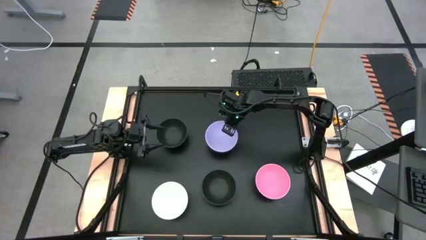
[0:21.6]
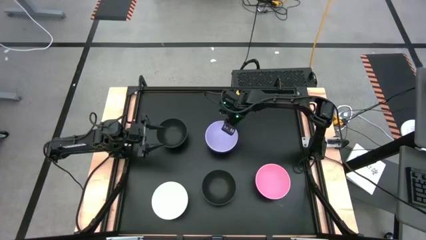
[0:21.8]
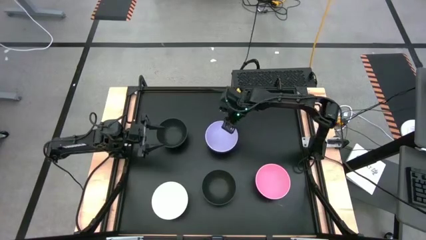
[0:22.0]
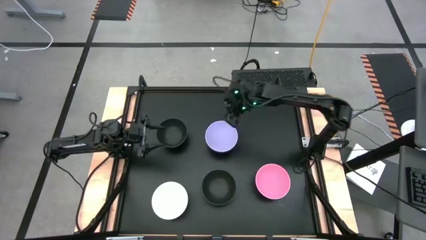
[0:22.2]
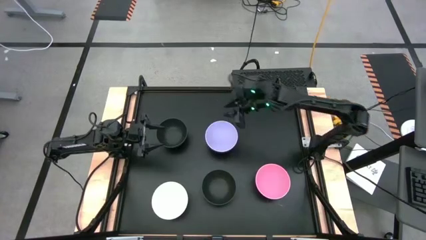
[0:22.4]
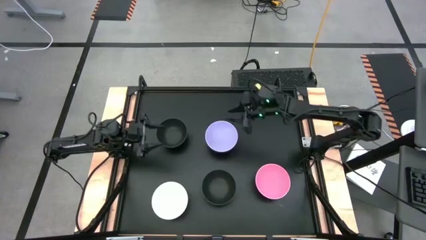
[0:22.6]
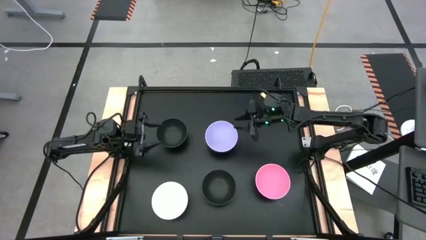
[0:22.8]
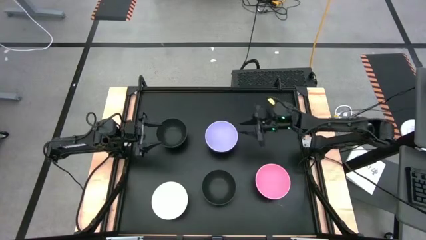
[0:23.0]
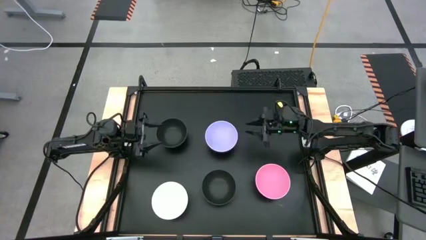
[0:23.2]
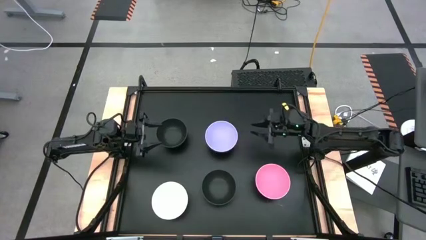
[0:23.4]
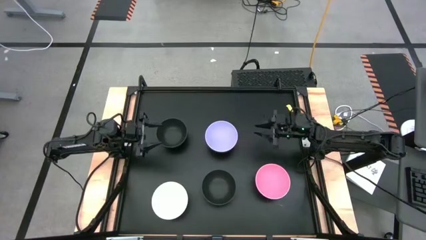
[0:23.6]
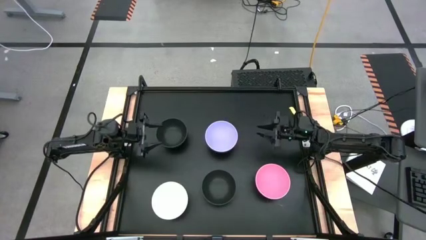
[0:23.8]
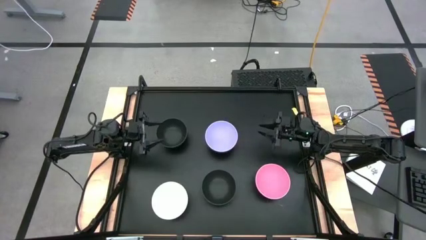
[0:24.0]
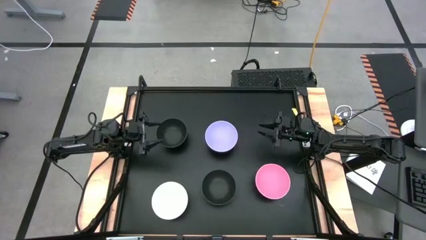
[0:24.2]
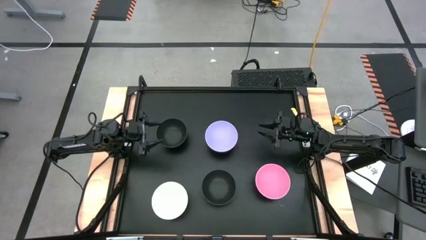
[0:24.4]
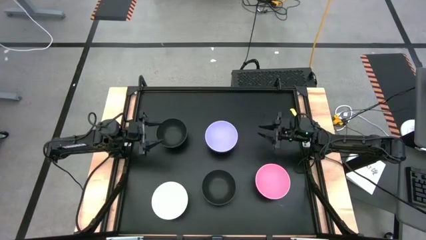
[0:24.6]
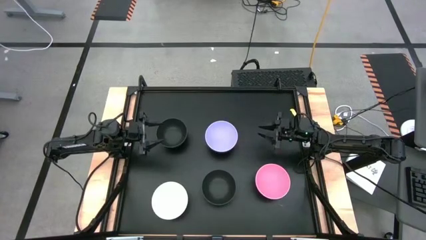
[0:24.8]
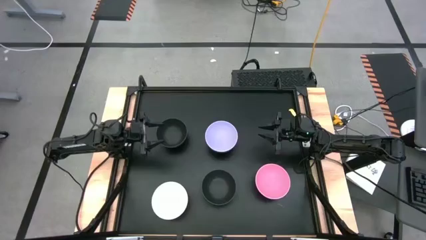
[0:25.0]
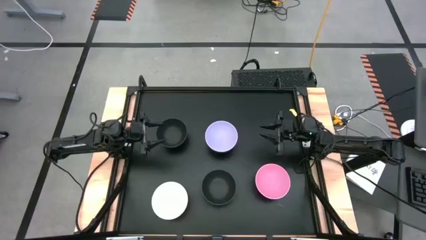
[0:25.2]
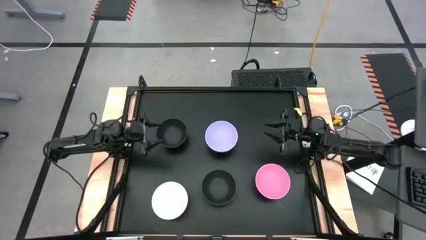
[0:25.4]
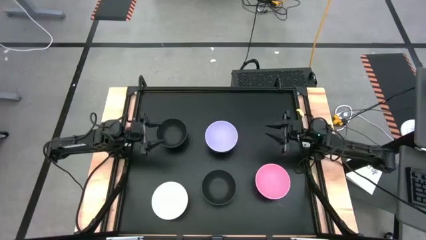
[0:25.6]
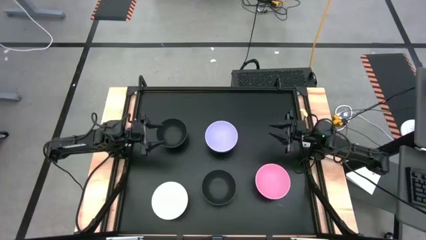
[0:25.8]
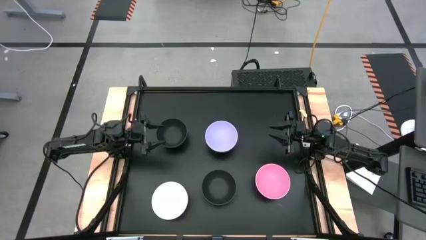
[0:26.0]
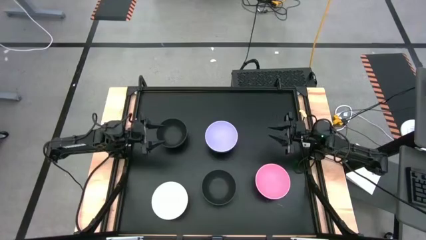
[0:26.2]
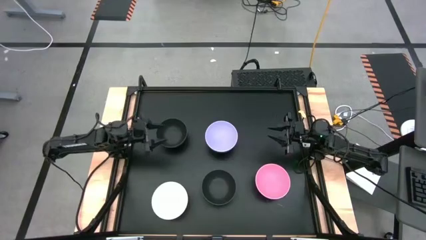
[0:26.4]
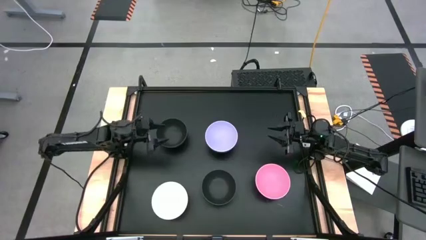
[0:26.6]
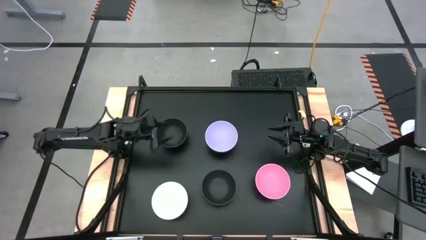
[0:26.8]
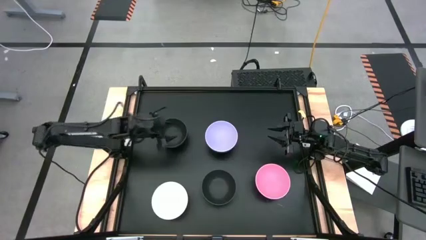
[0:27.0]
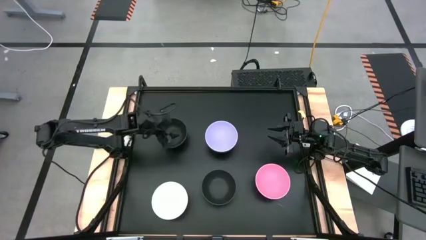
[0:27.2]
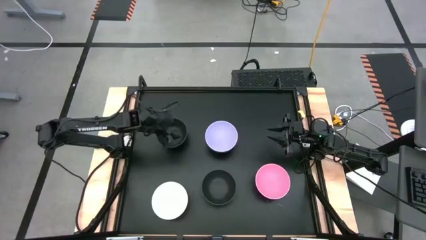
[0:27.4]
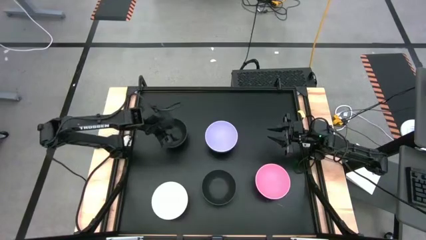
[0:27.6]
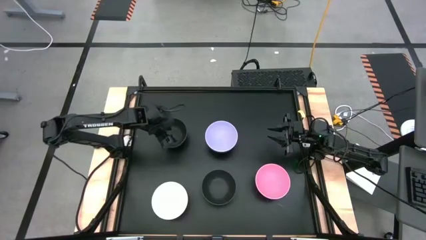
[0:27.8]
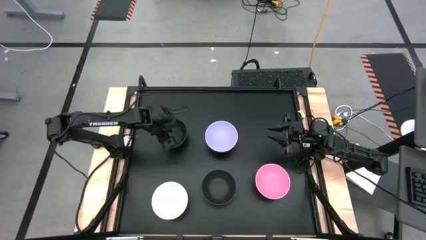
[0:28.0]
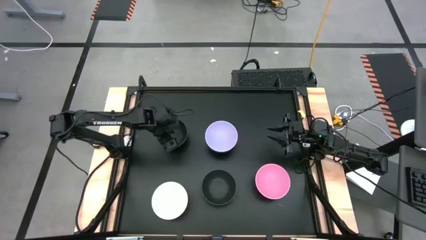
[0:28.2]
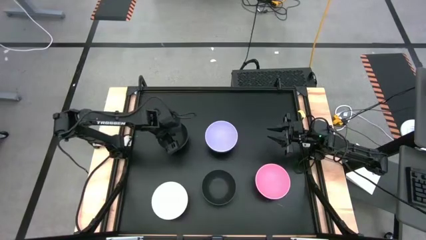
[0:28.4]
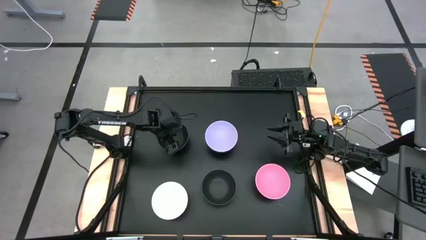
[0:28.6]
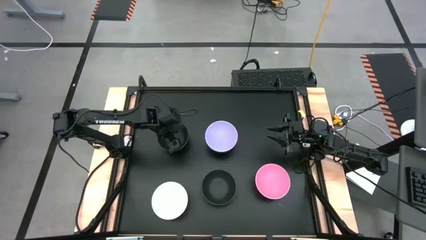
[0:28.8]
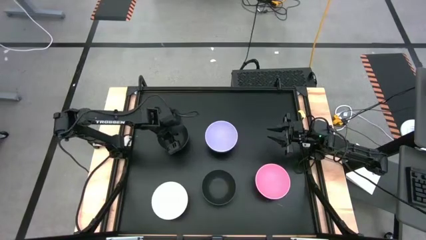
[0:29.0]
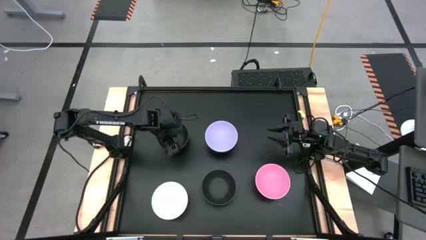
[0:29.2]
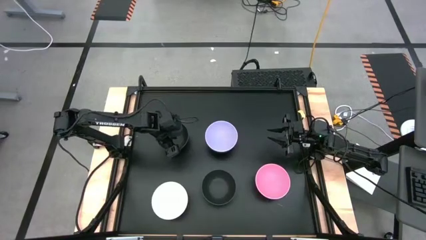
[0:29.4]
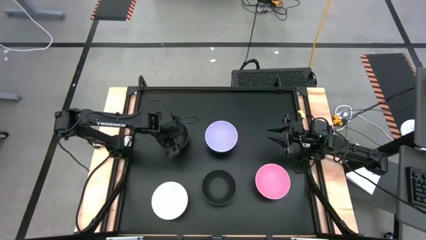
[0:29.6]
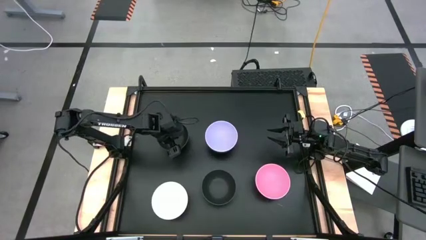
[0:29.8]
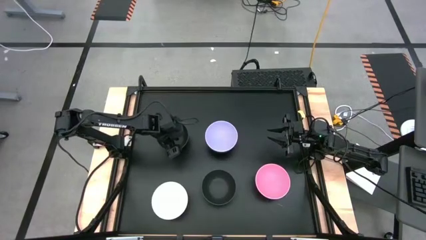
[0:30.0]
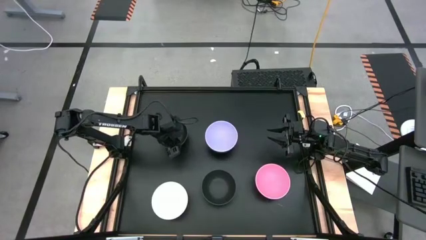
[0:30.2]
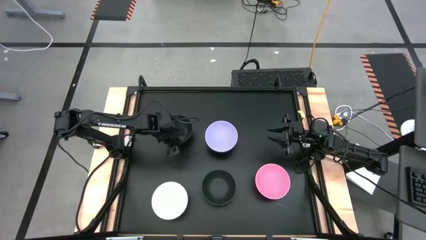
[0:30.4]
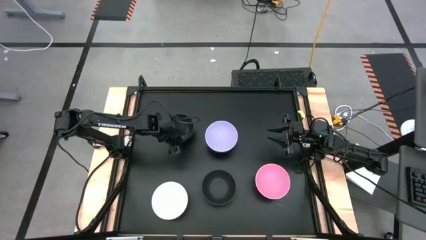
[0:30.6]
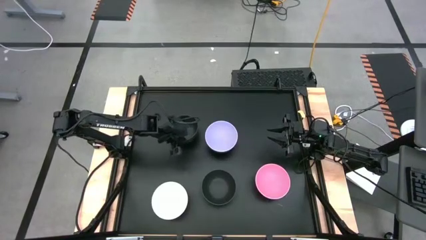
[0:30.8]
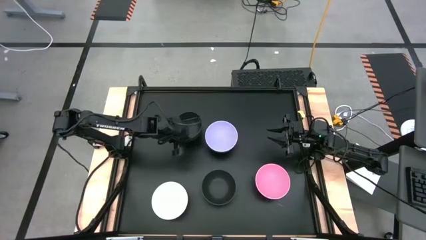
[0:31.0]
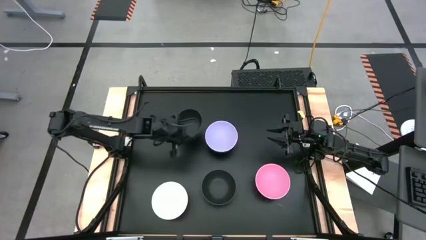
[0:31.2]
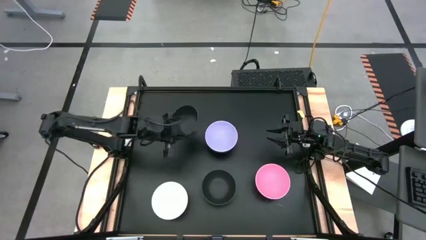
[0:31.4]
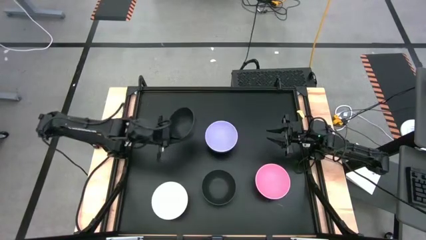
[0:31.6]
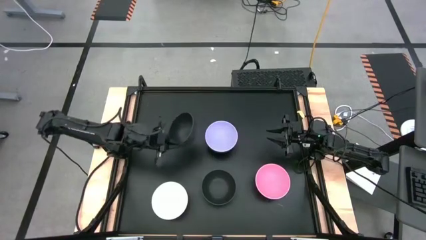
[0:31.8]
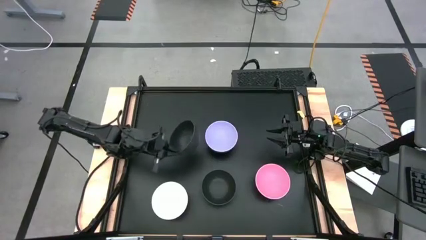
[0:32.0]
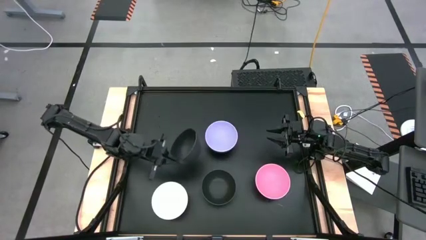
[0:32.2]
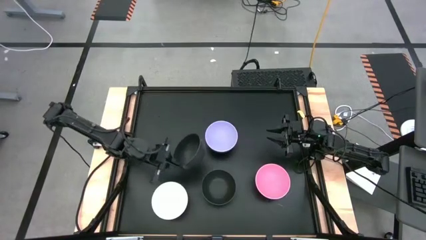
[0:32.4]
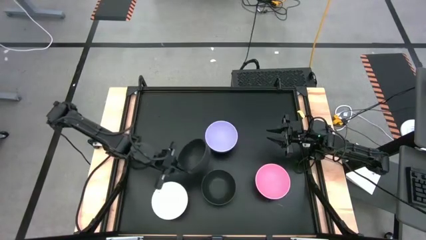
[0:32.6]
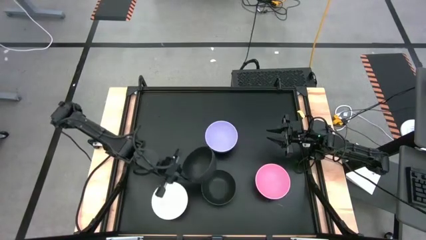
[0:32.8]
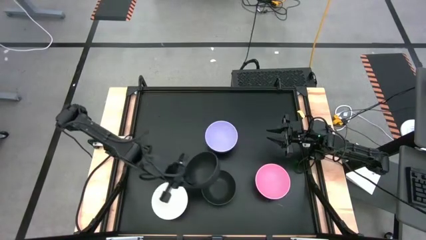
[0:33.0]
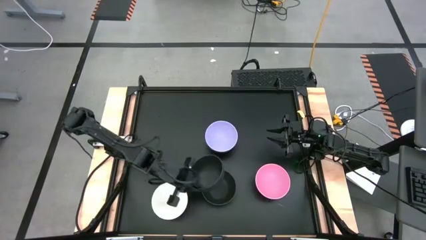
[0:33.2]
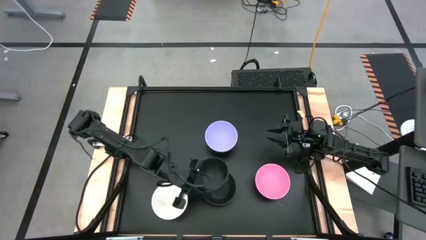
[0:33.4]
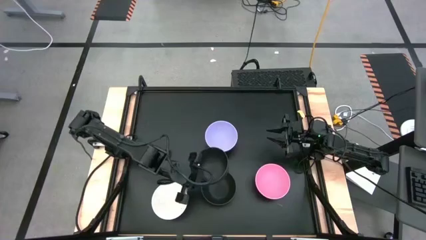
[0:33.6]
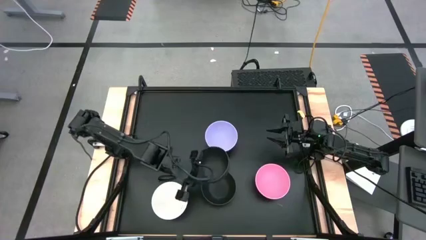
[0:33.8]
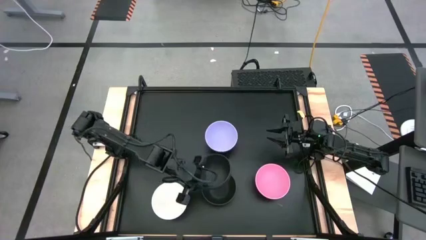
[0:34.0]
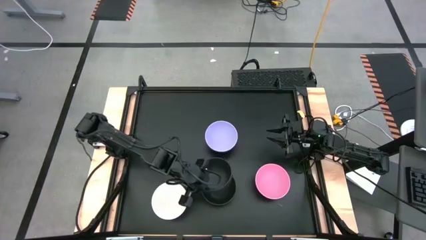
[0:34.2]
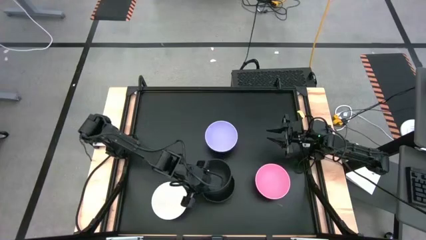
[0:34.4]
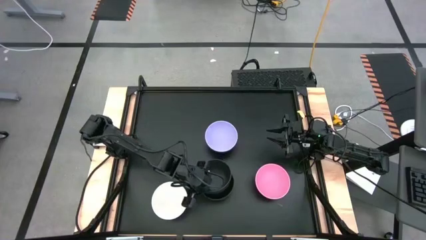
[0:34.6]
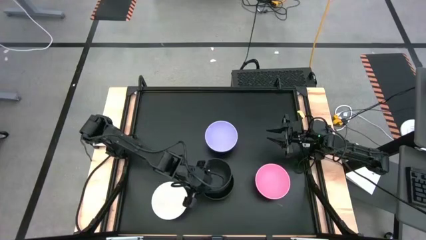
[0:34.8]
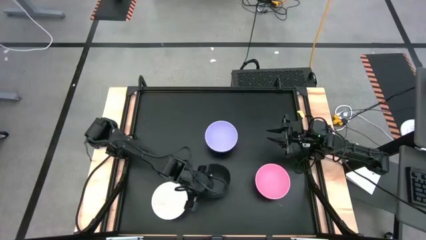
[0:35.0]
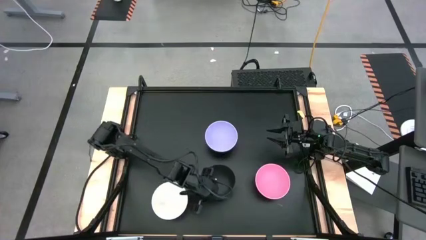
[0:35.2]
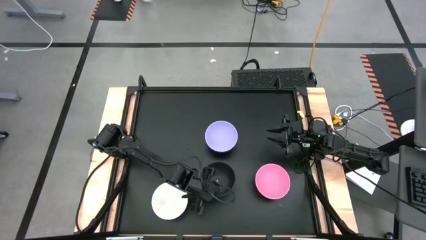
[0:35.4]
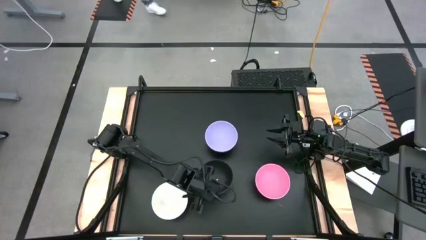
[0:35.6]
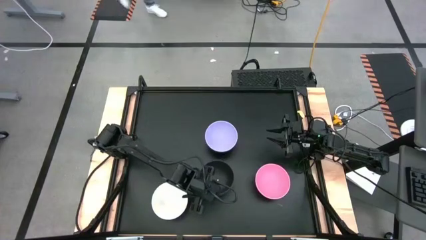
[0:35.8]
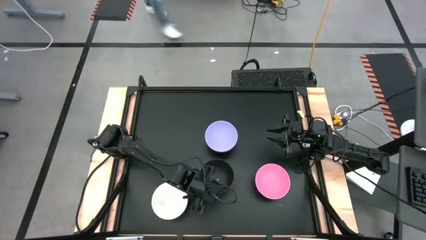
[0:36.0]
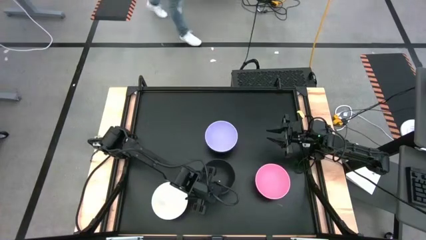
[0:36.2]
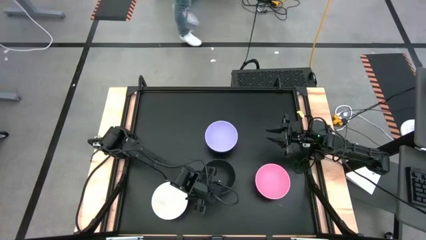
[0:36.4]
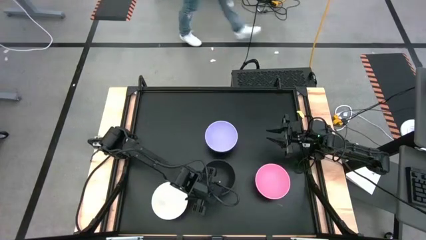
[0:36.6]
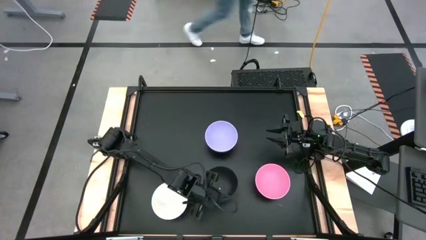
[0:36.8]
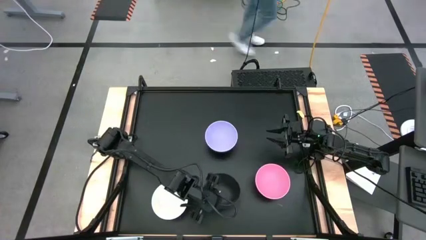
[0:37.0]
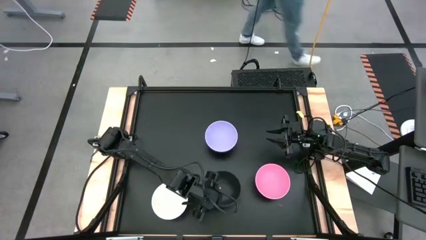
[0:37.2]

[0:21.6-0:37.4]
Task: Nest bowls inside each other
Stack the top left black bowl on top of the black bowl
